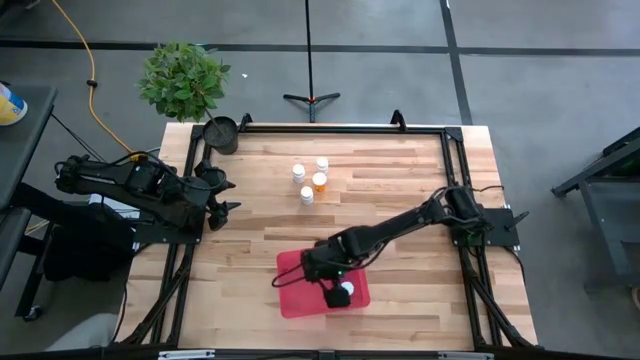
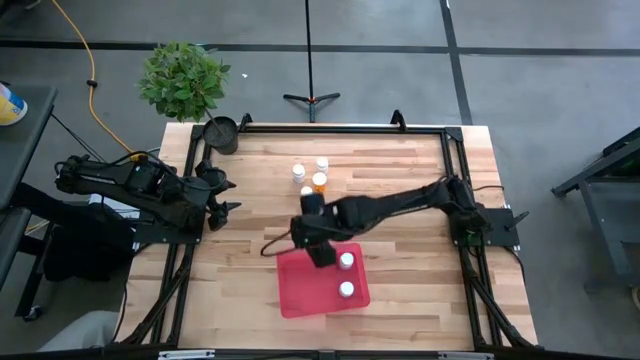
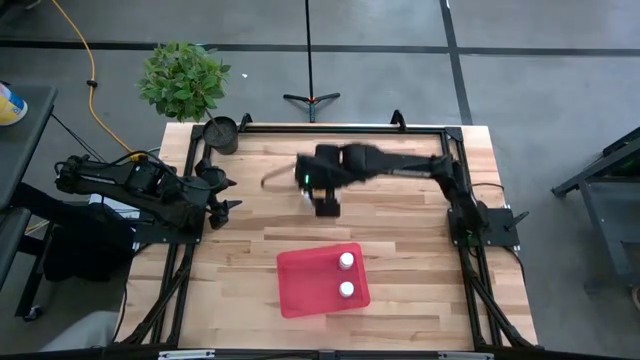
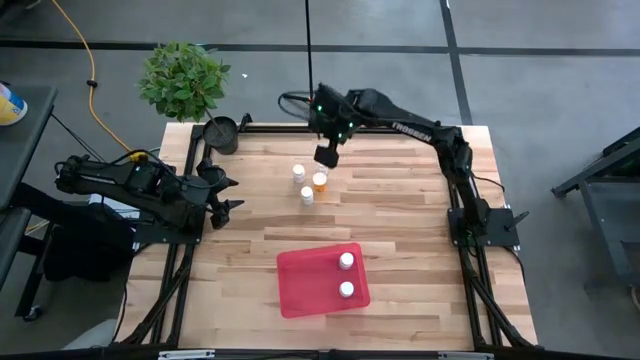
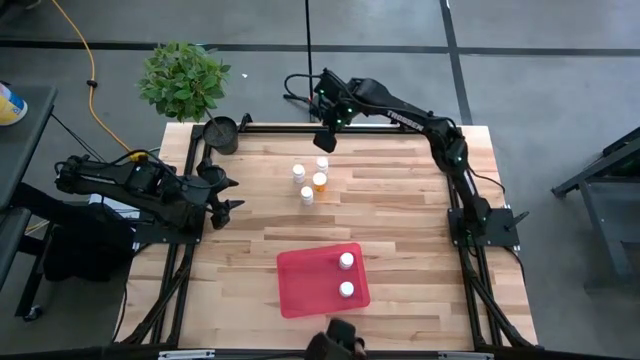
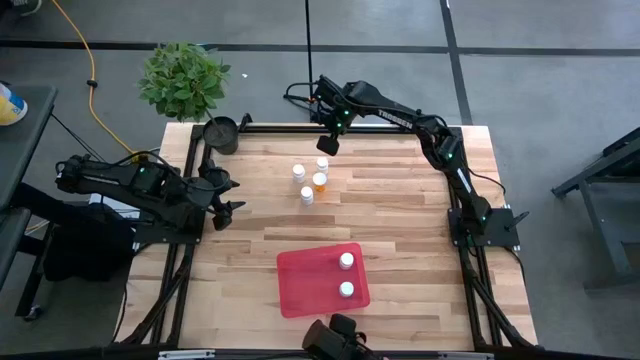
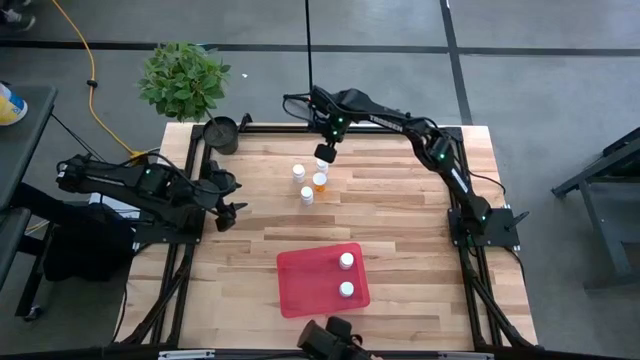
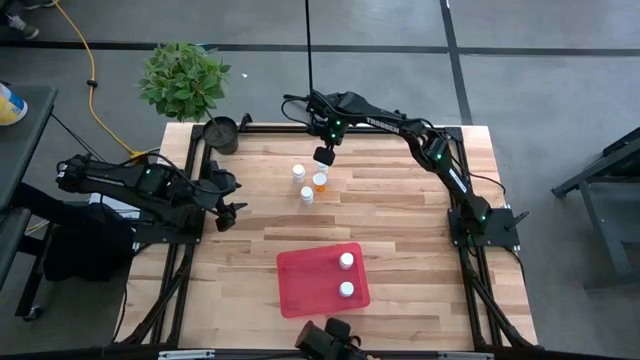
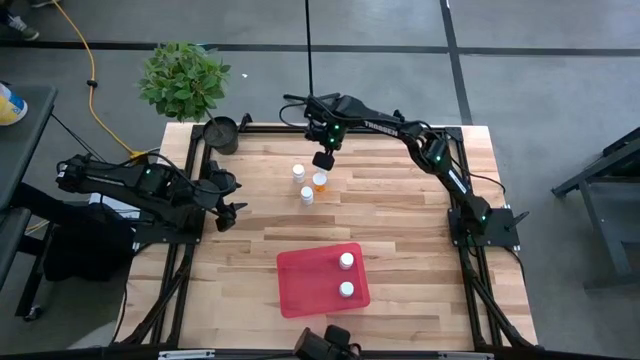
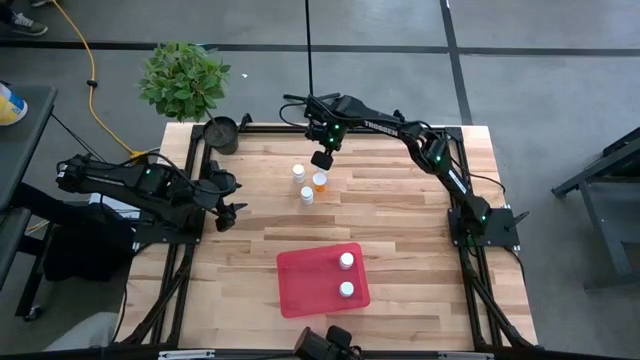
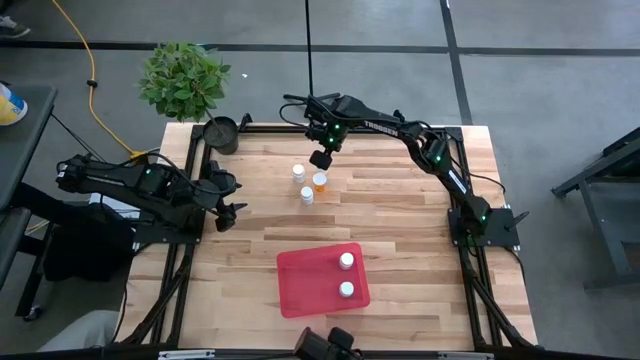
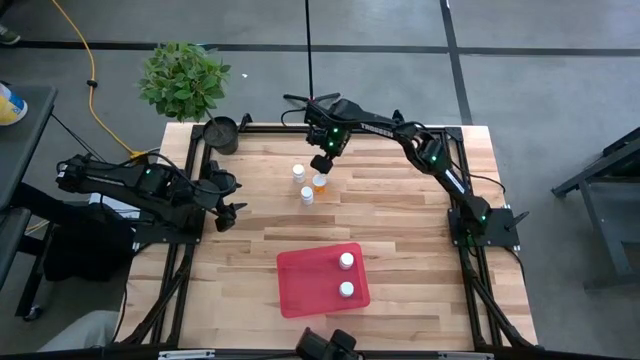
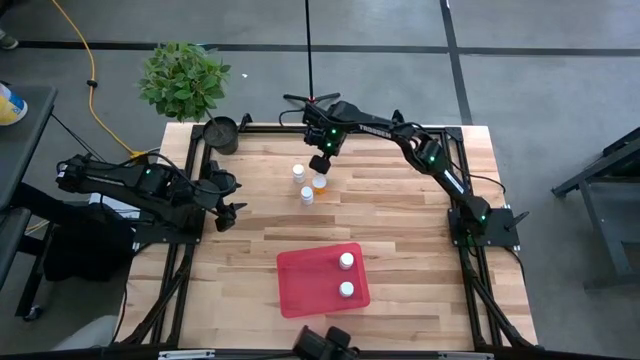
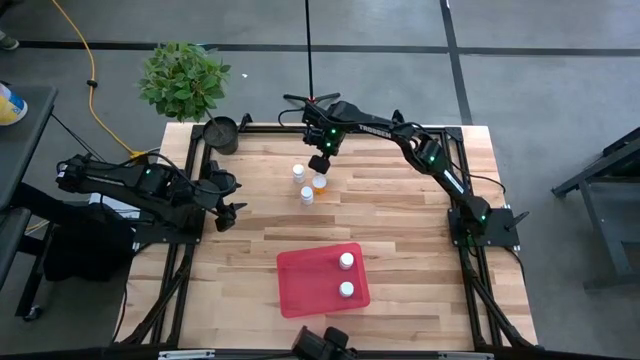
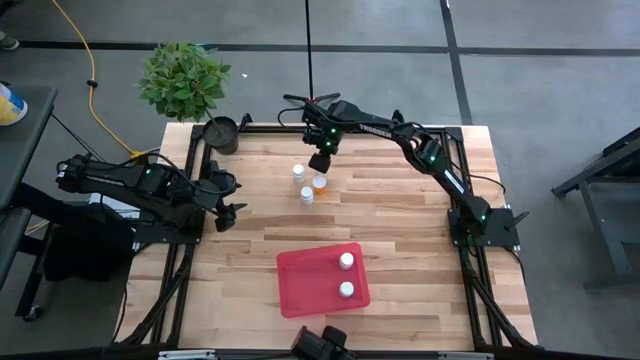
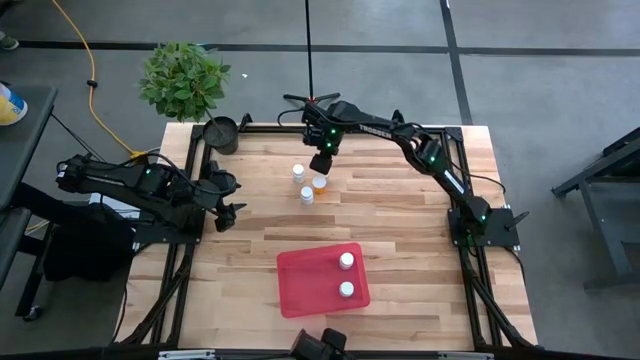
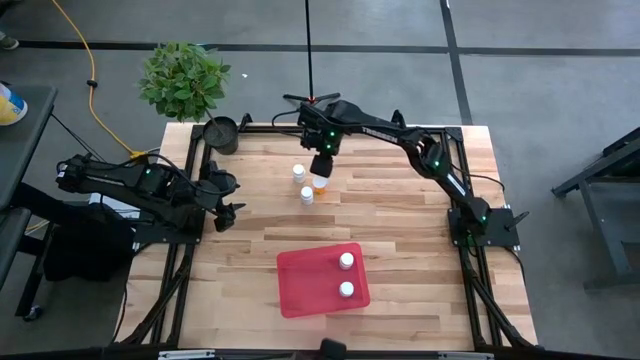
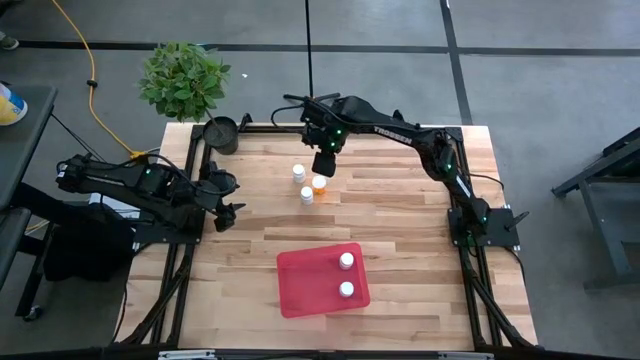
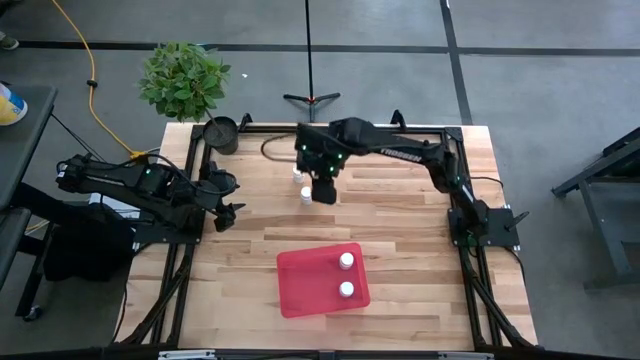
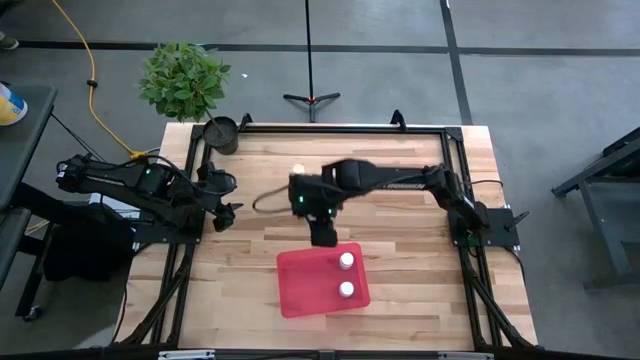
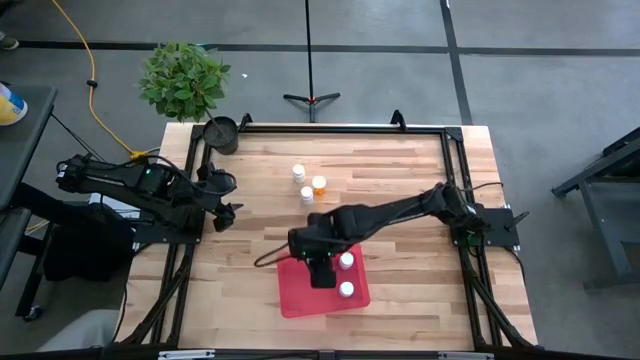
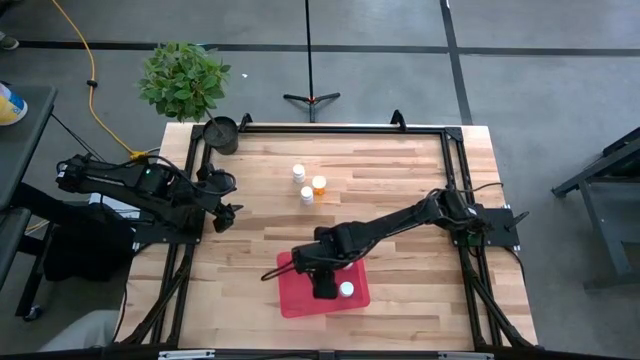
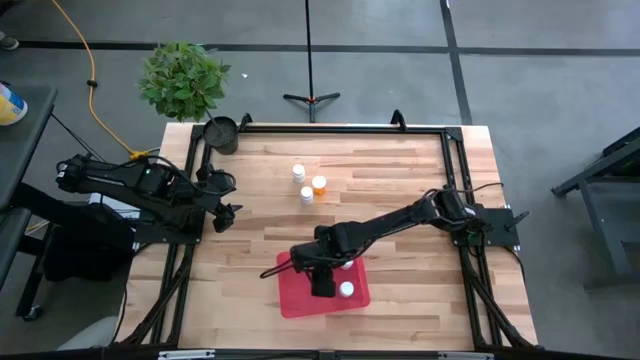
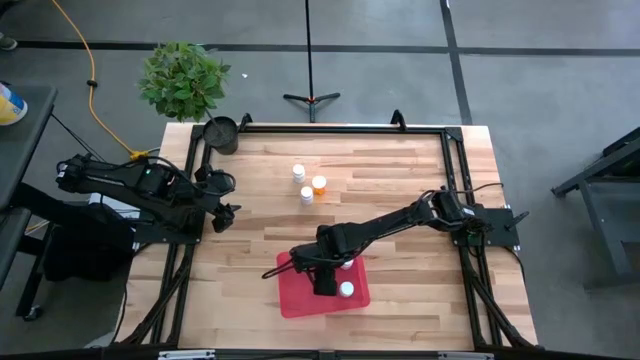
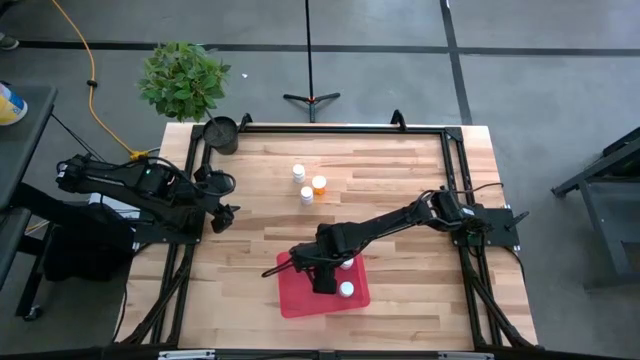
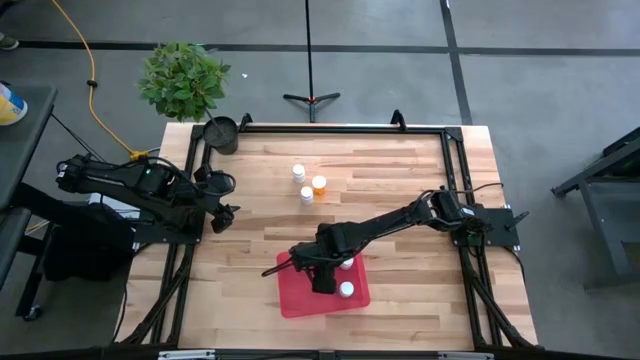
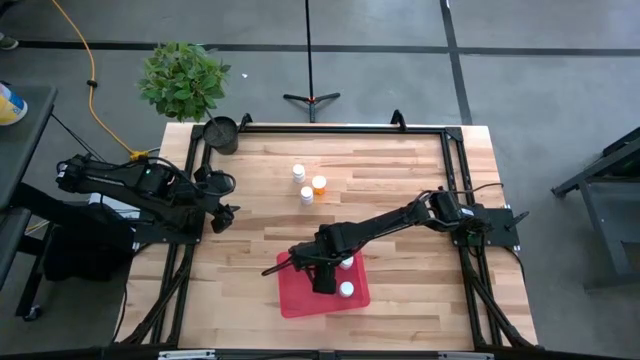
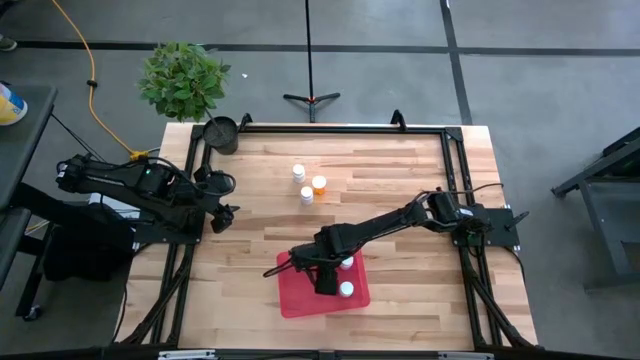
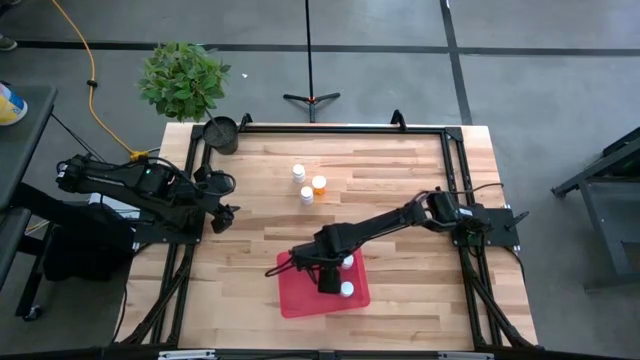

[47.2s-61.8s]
Task: Pick and place pill bottles into a basket
Put the white pill bottle into the red bin

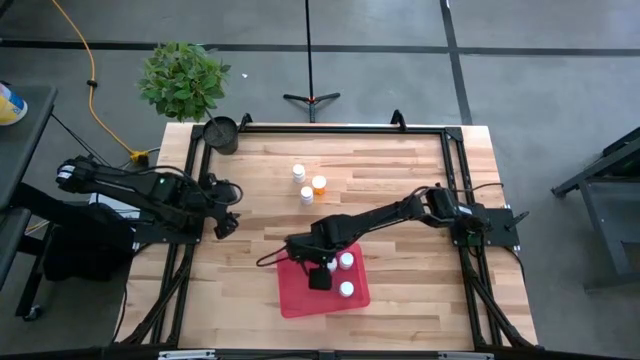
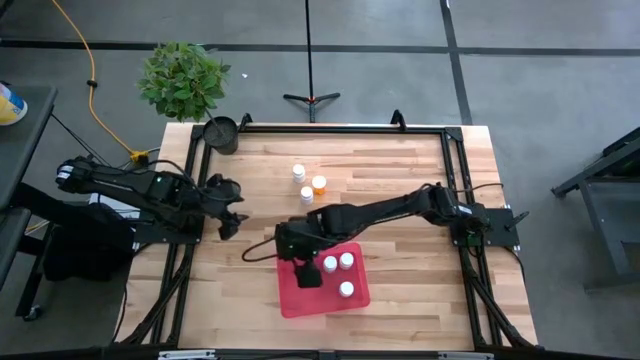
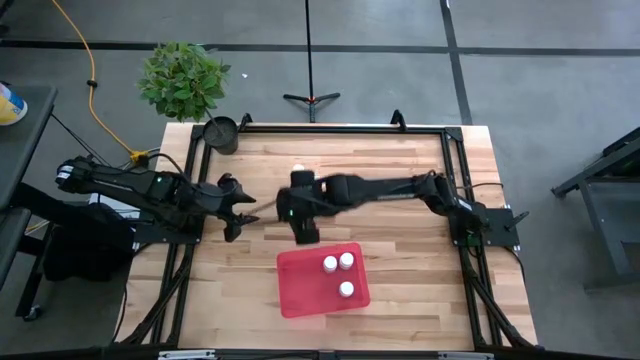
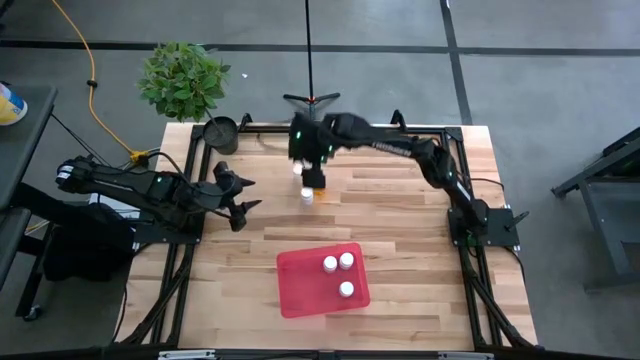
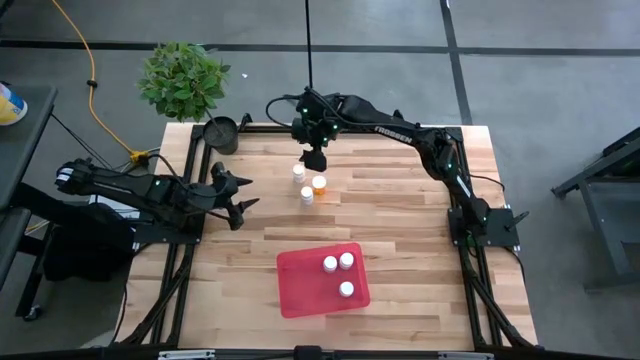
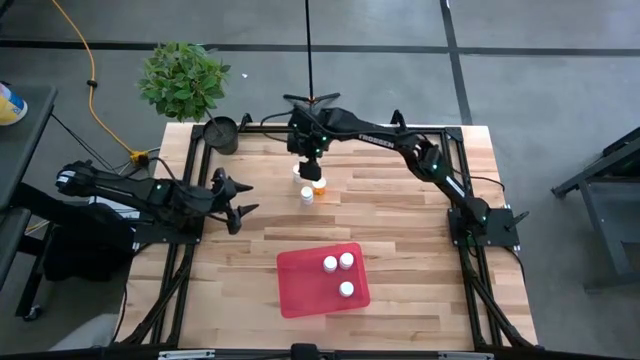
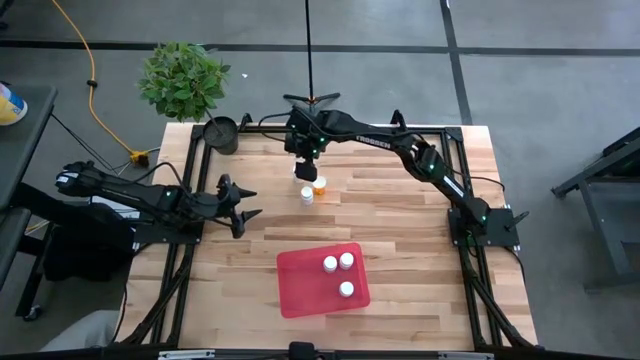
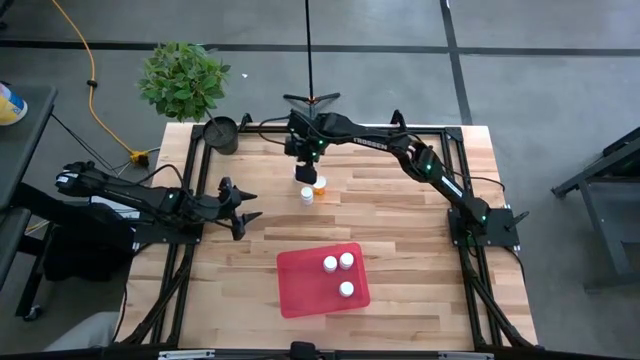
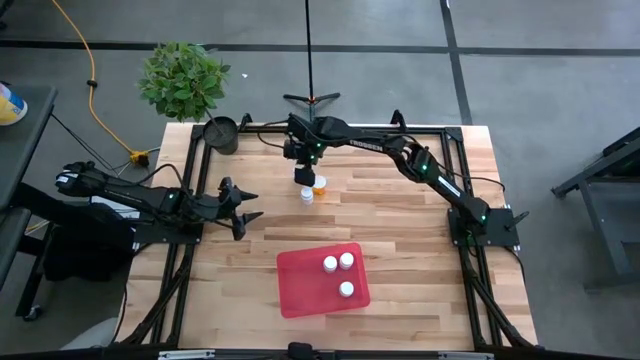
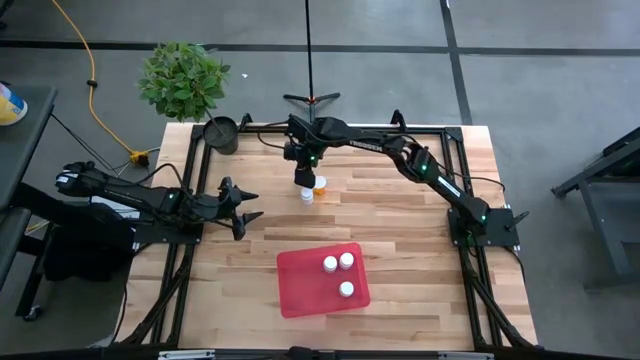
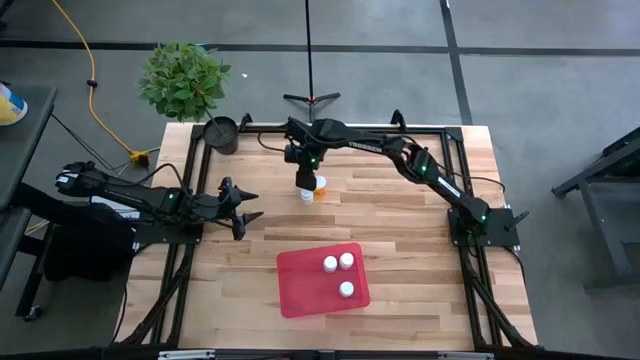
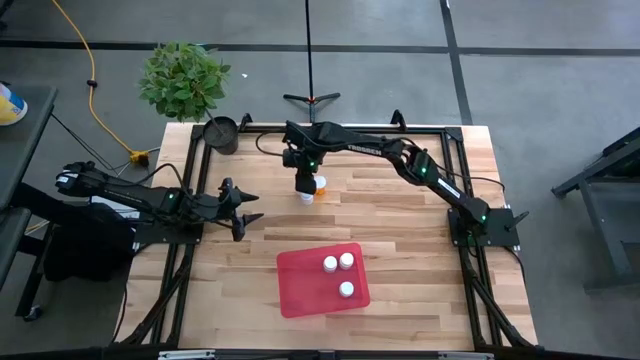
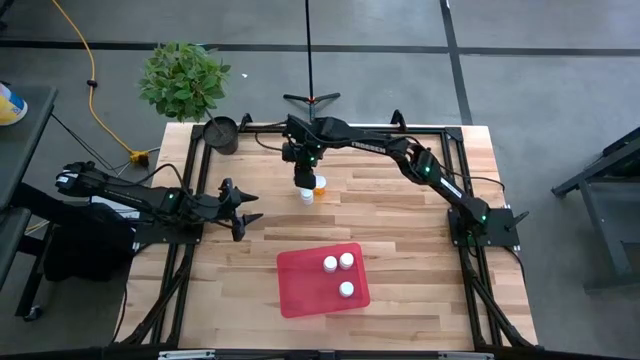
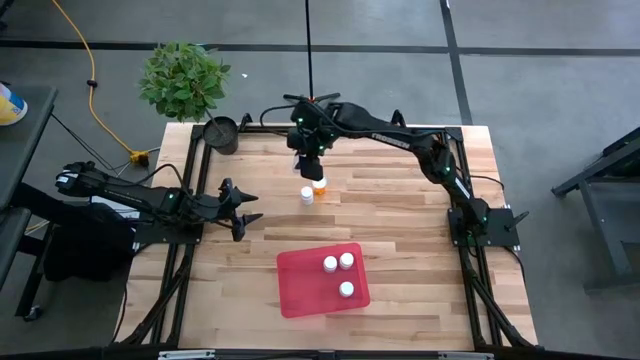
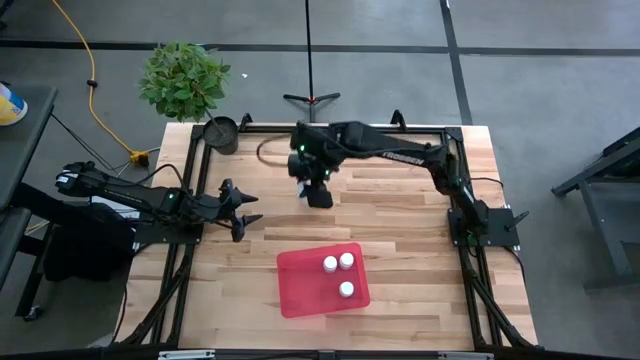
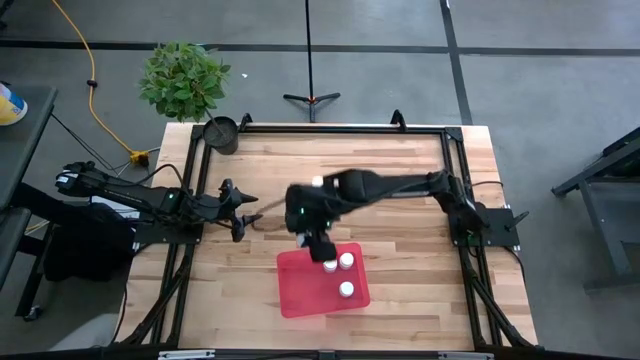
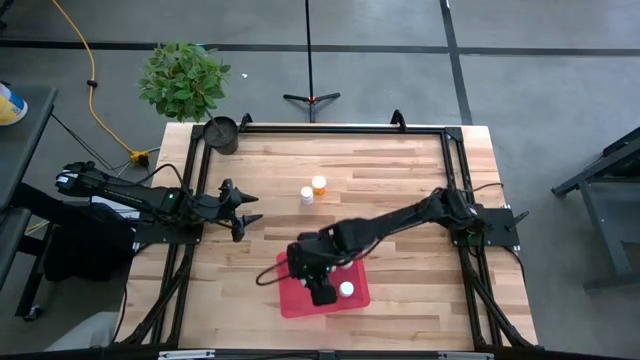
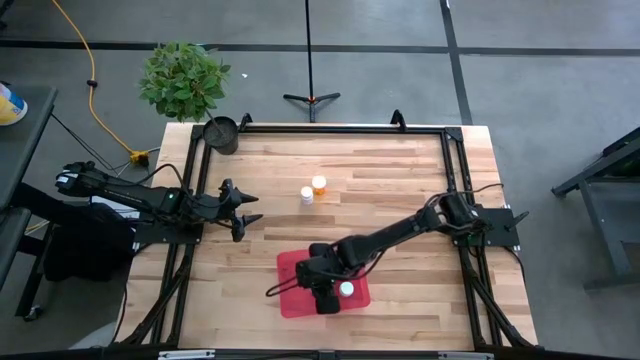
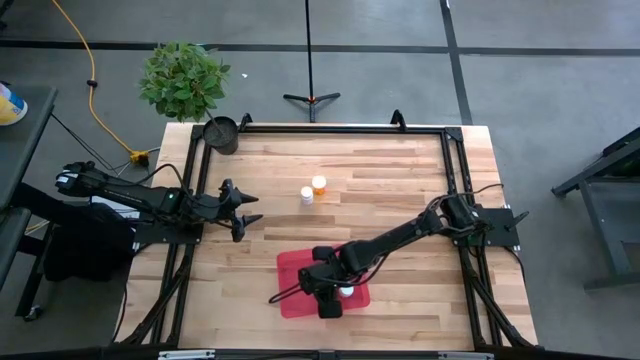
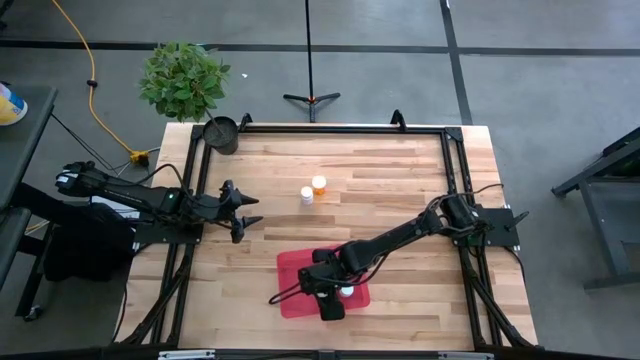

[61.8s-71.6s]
Put the white pill bottle into the red bin
